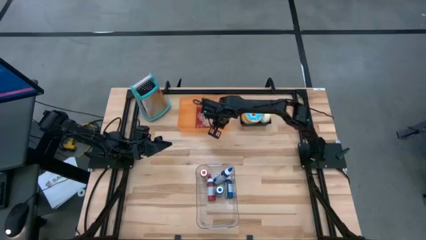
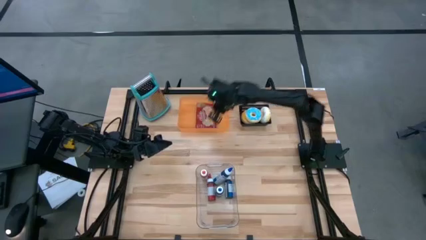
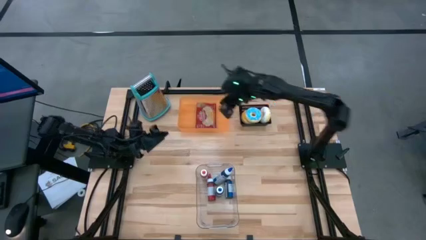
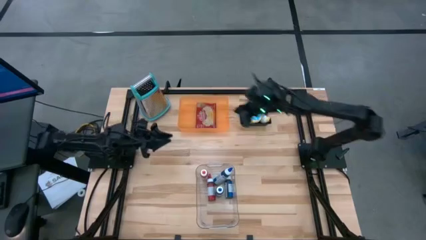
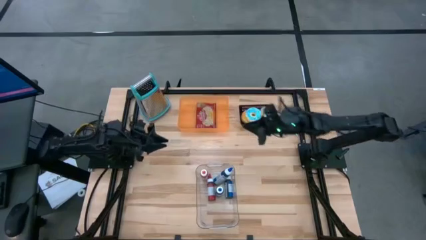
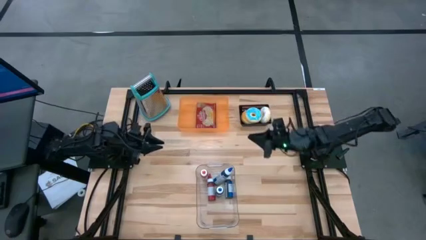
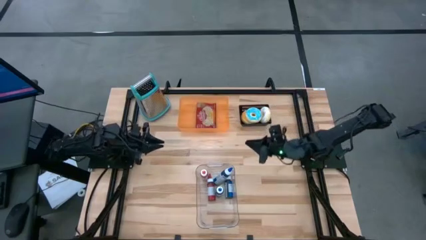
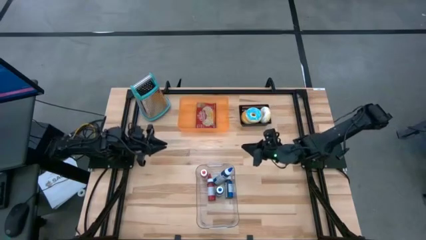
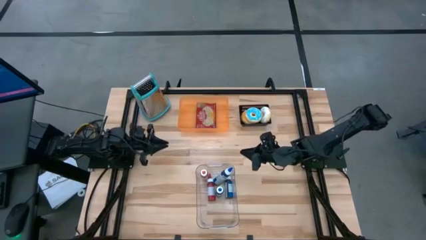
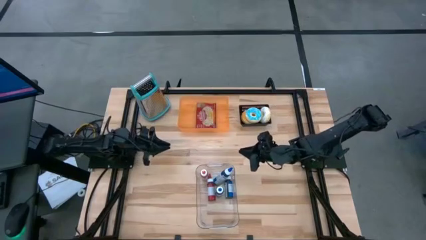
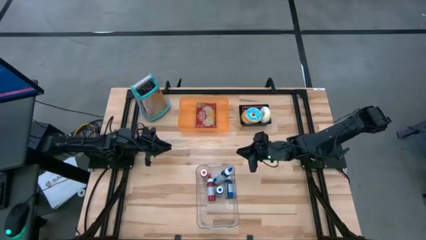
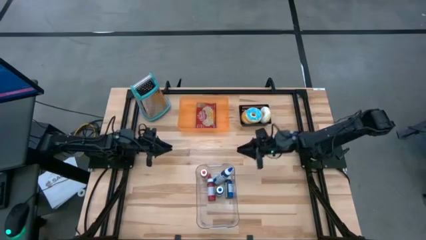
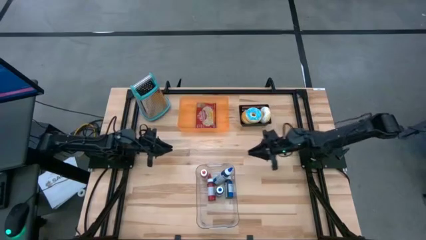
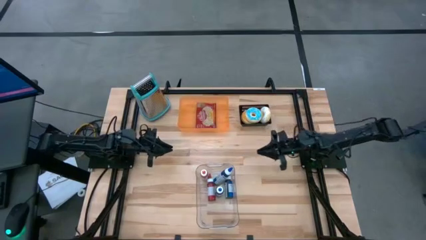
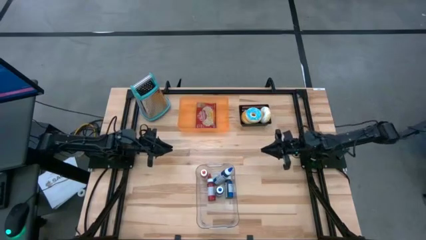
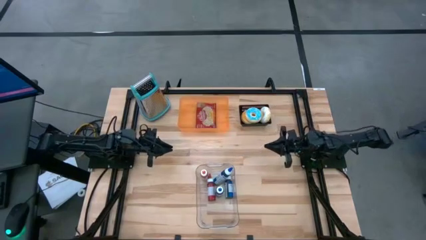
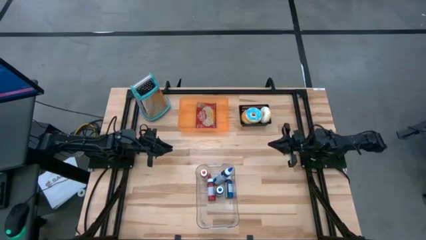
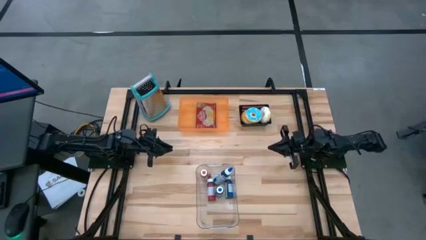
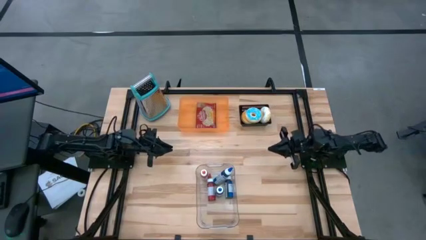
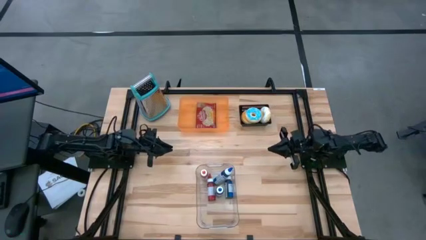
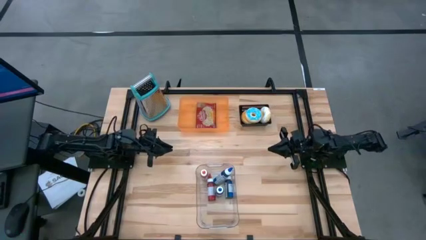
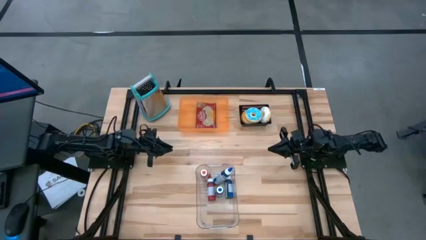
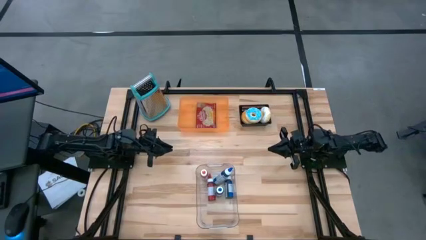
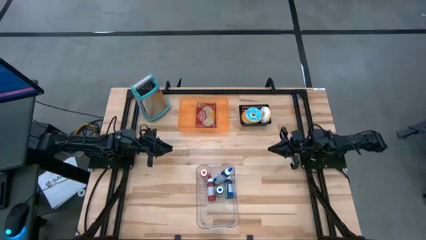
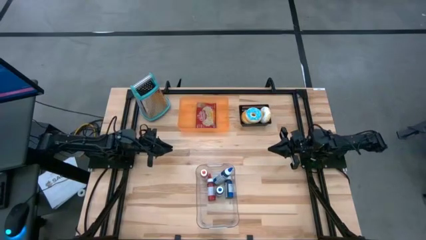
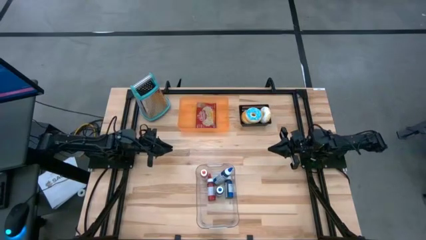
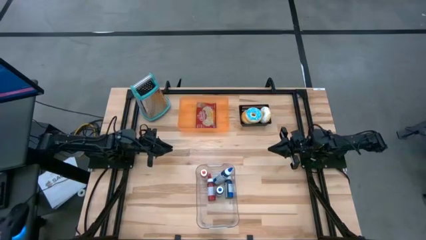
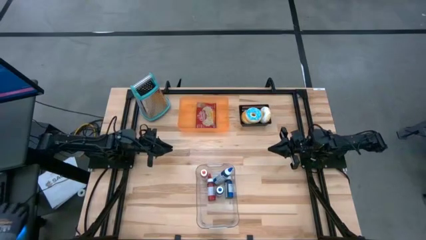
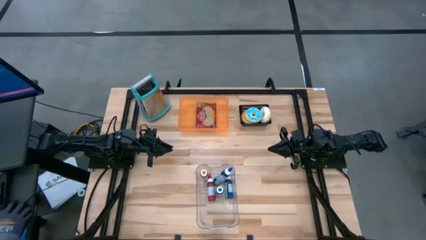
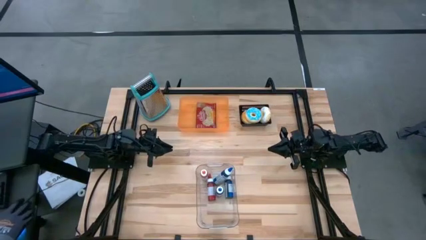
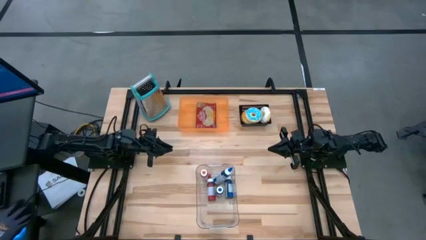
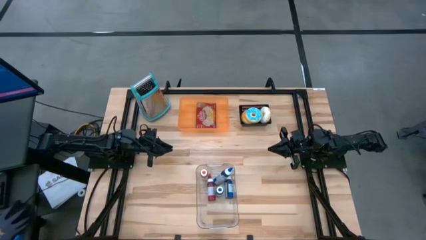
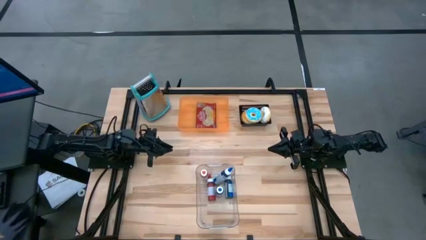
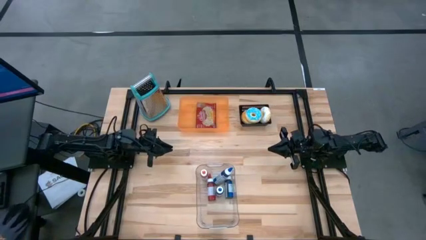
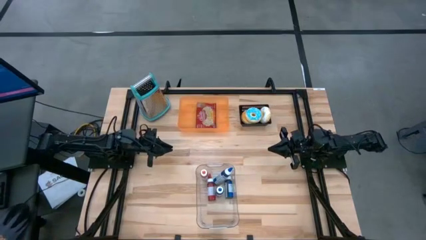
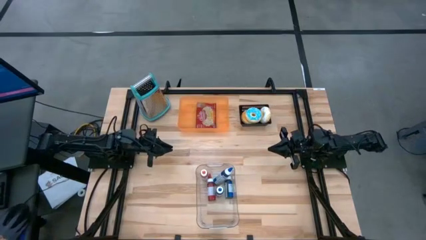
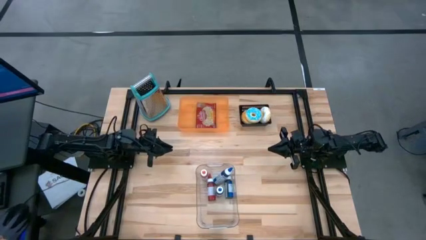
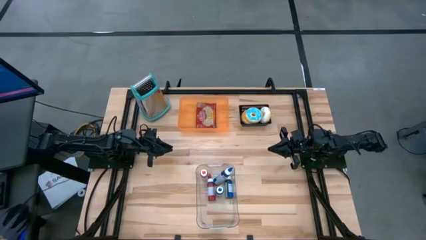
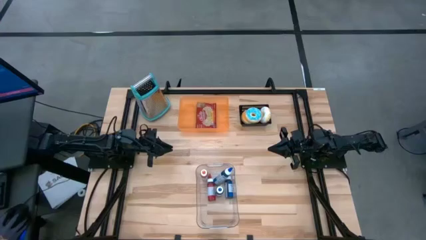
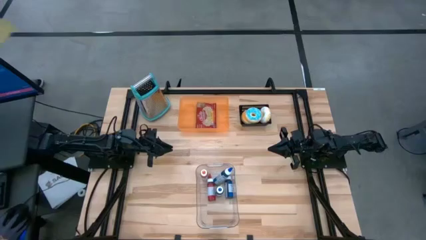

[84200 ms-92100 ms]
Return to Home Position

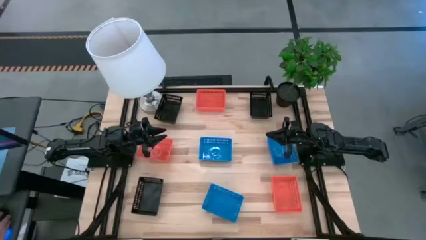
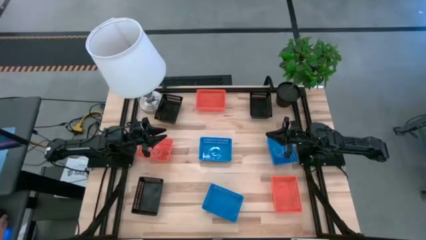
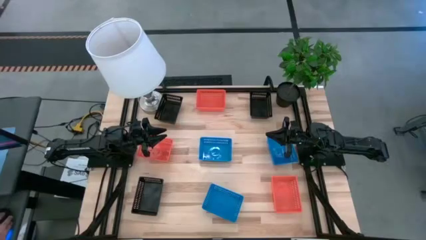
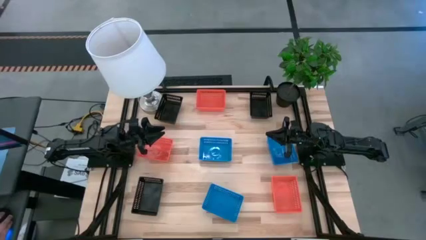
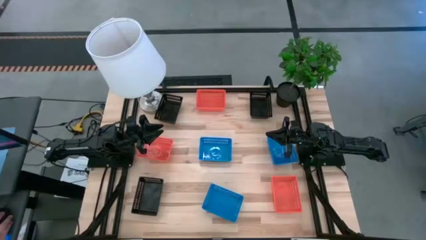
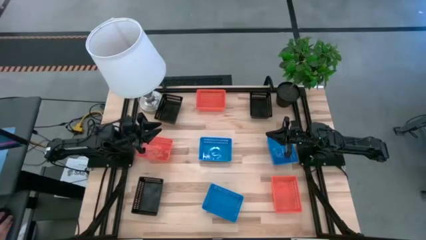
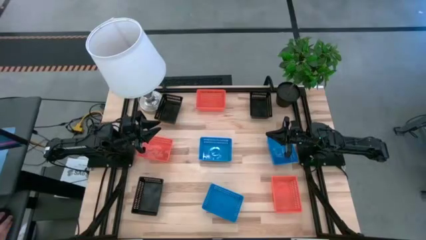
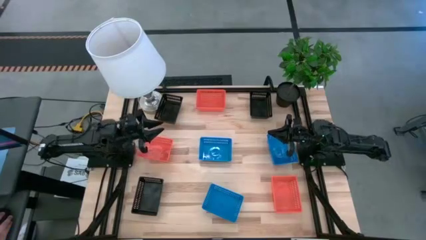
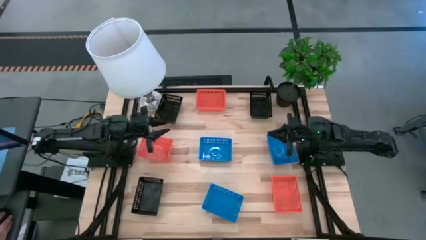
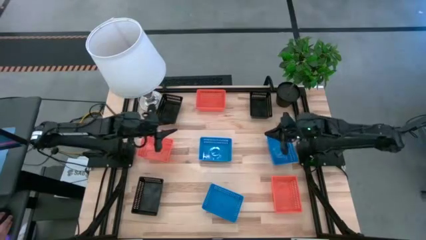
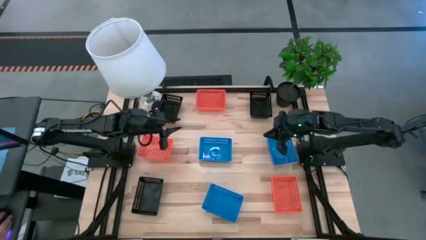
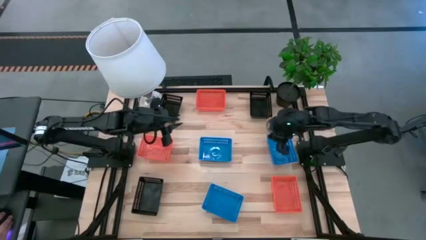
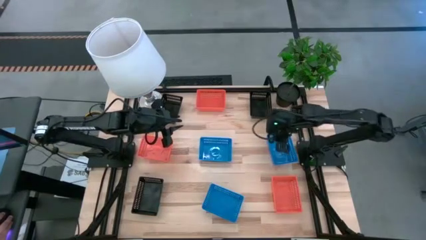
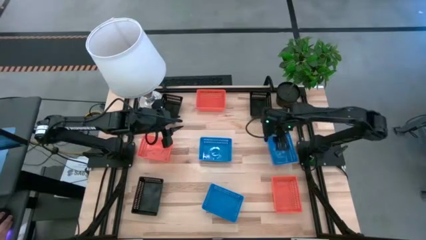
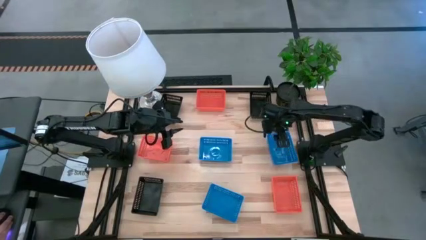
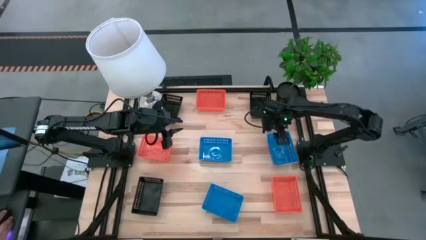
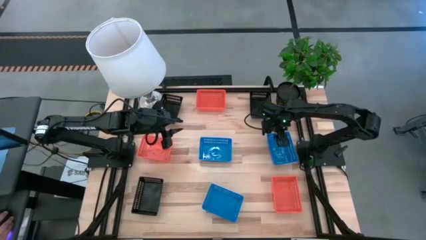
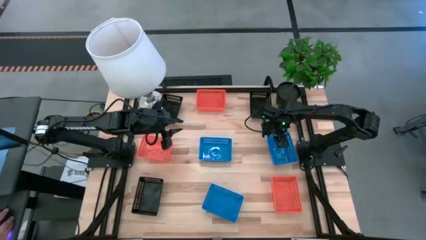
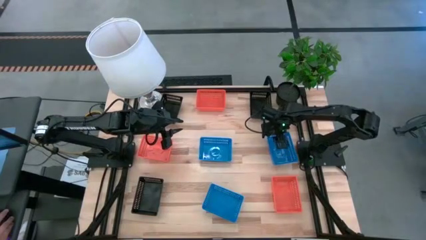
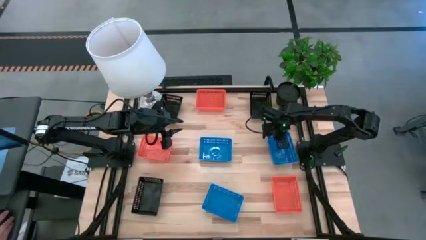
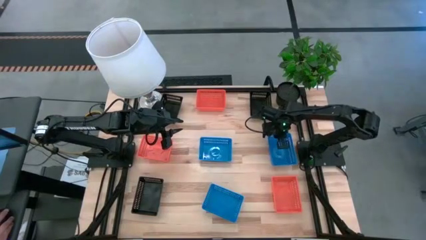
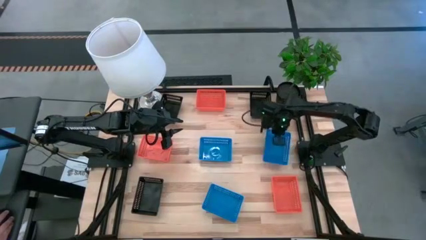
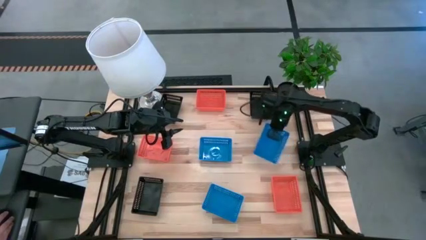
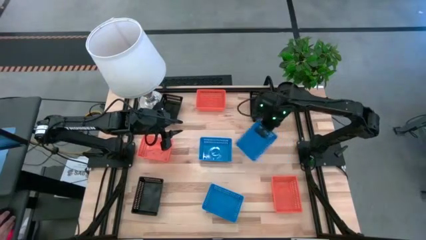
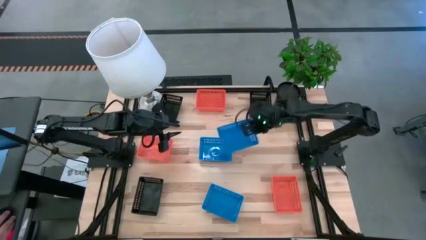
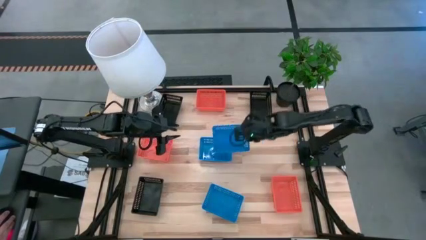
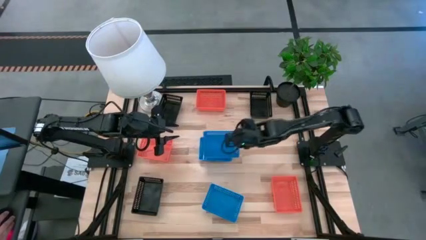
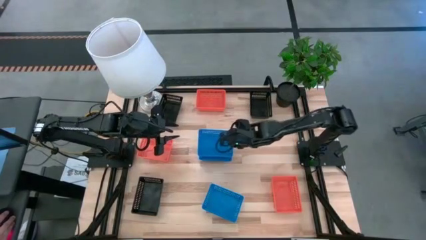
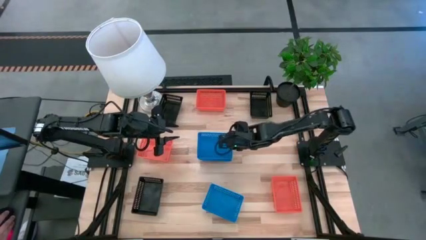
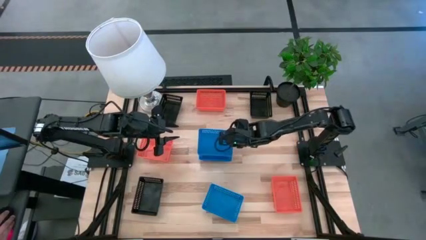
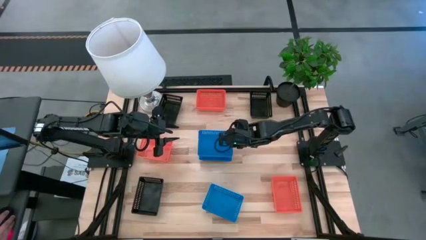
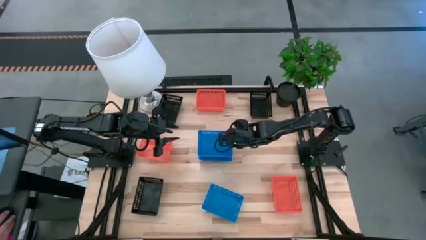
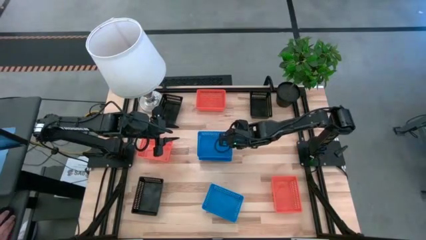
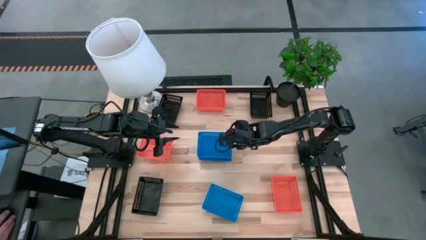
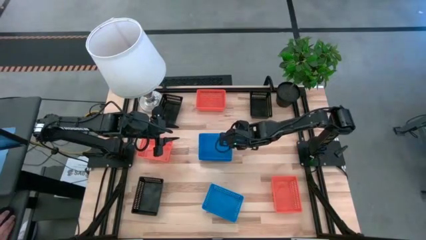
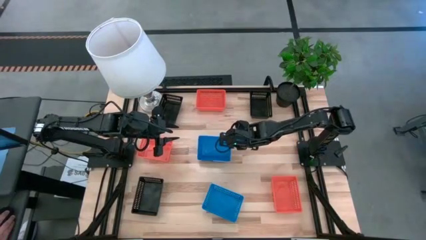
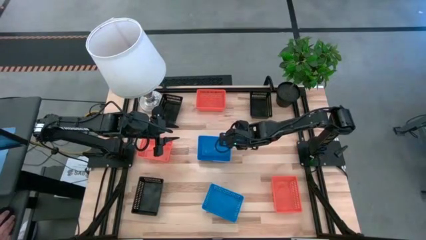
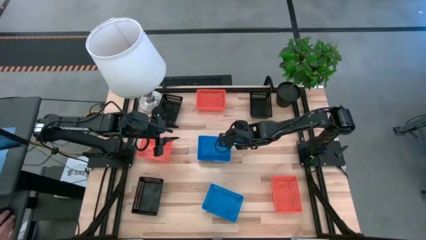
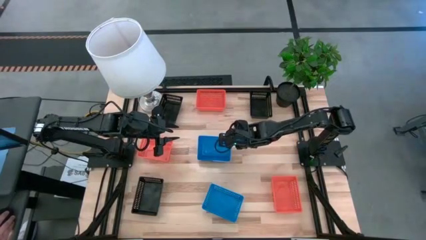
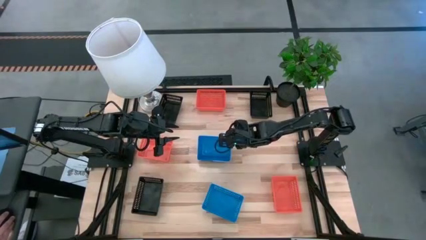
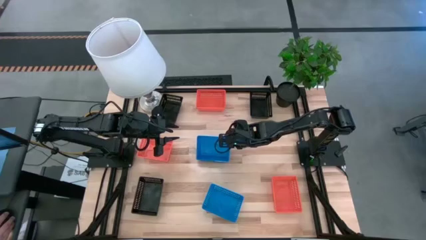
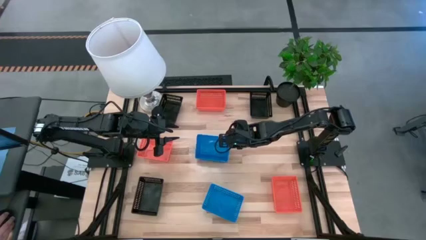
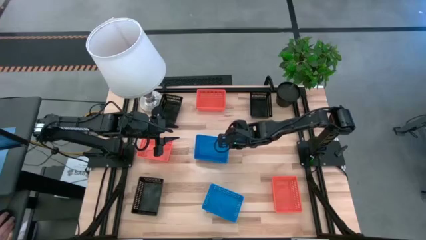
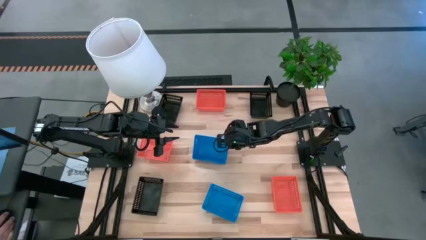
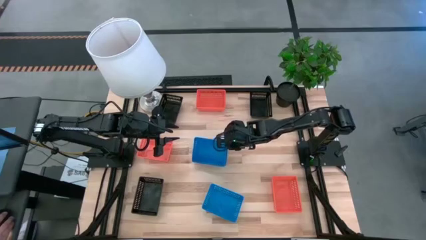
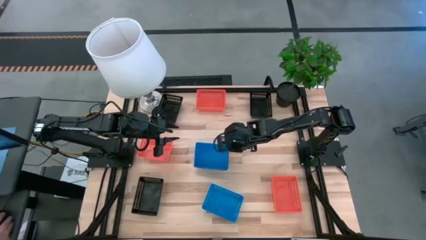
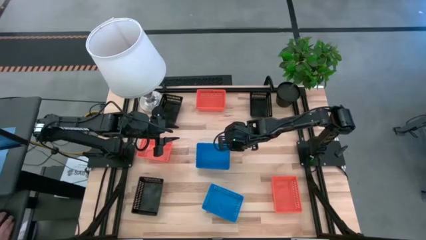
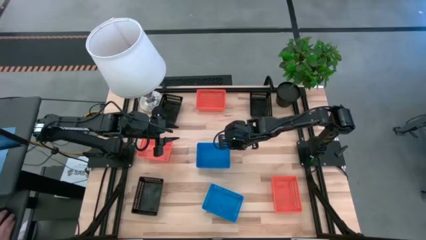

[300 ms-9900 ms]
Stack the top right blue bin on the top left blue bin
